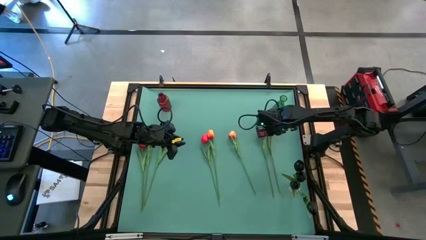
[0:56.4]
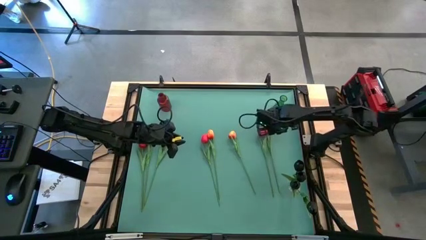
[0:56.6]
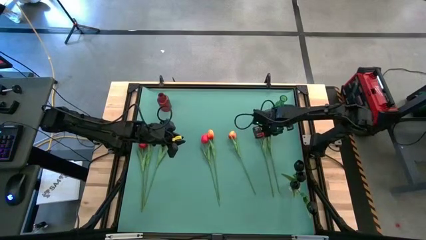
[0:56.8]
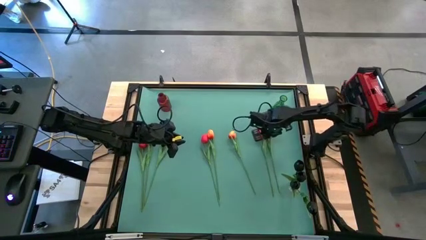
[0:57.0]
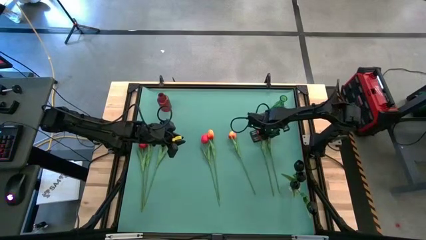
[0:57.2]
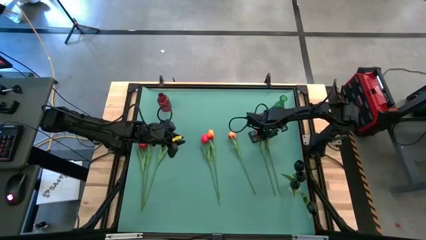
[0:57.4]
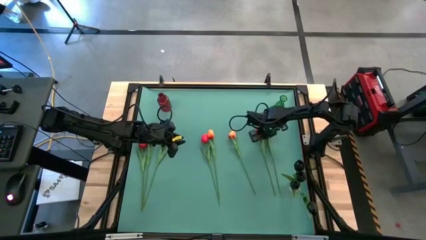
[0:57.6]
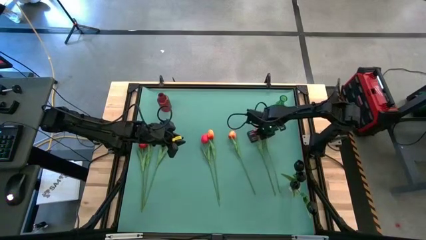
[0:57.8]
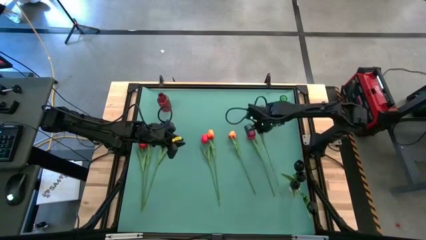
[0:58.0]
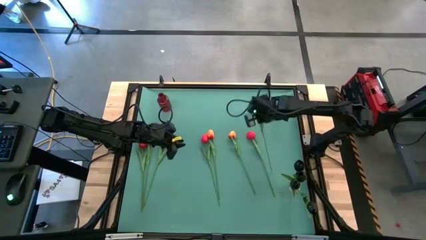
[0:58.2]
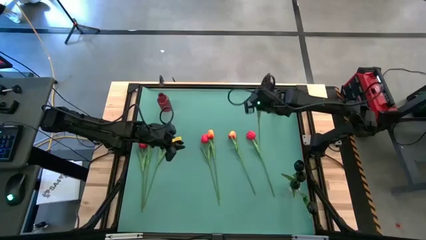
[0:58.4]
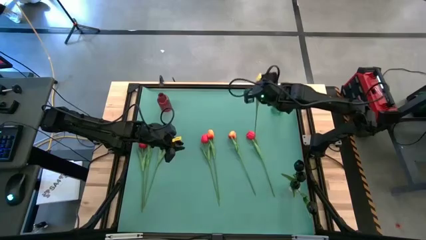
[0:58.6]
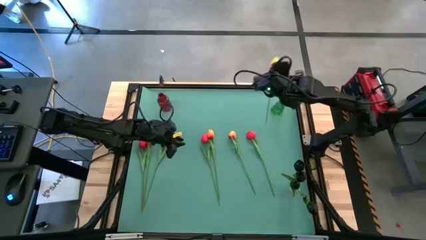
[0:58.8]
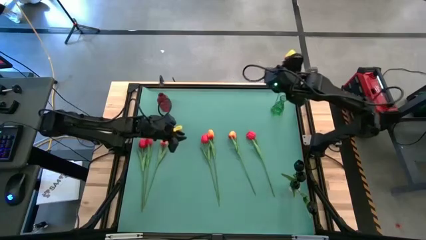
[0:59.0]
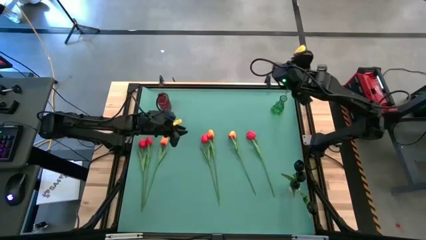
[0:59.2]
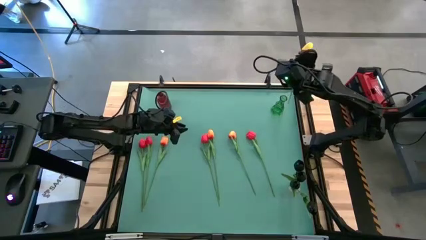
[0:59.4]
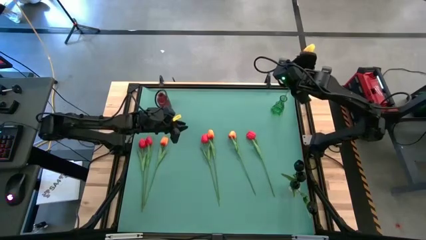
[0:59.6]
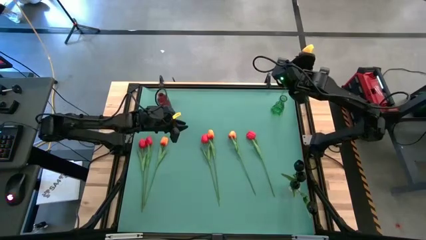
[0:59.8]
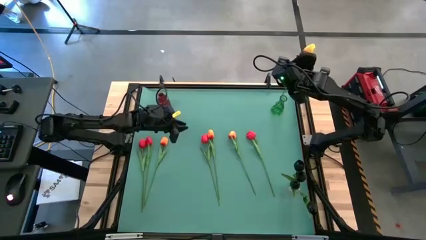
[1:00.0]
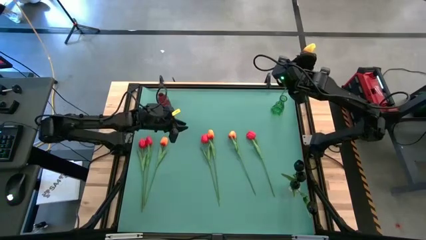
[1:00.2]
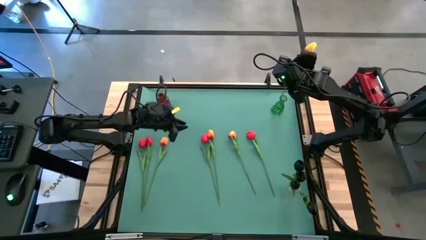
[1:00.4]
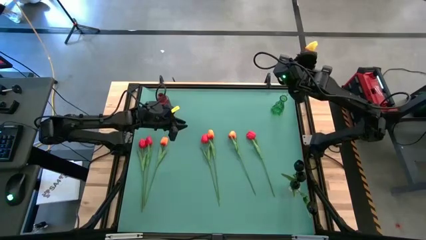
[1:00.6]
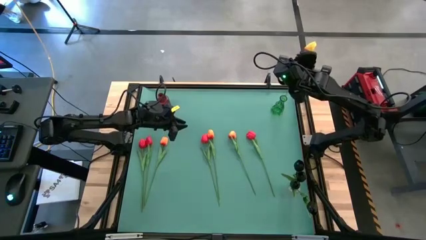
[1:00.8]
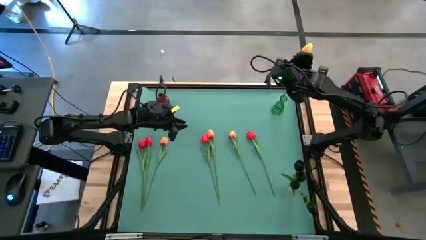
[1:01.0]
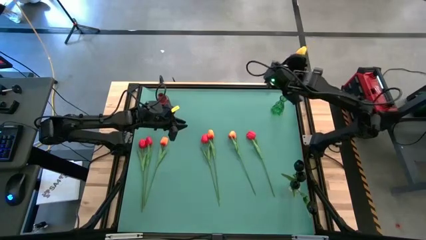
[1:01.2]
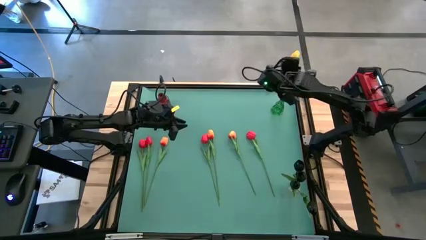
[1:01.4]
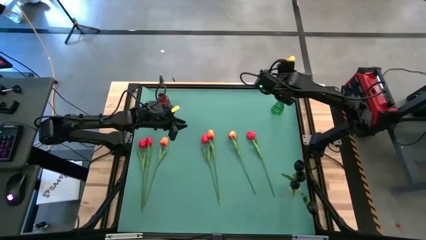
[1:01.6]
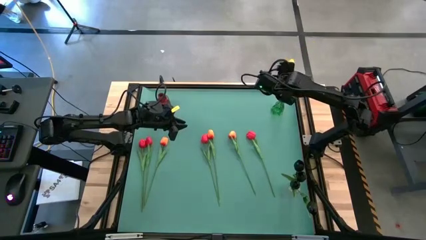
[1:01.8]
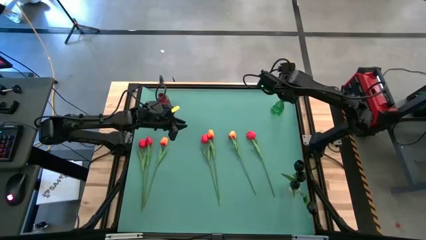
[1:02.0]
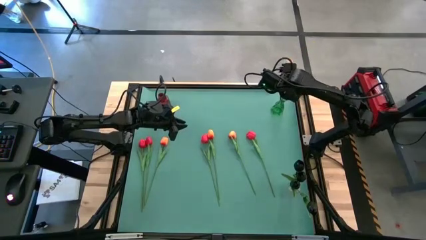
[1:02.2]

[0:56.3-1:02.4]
Task: Sort flowers into vase by color
Put the right orange tulip into the green flower vase

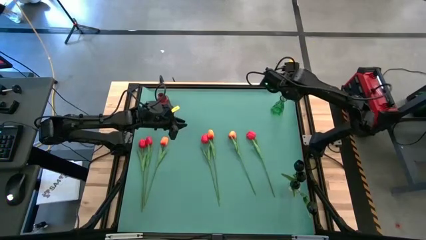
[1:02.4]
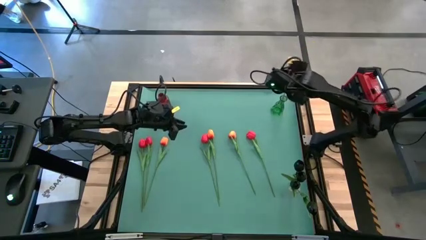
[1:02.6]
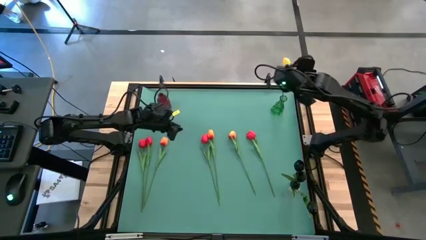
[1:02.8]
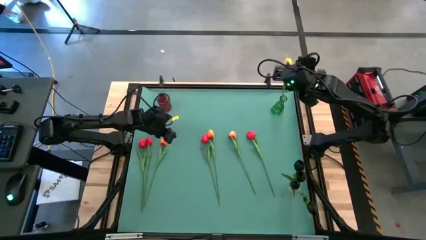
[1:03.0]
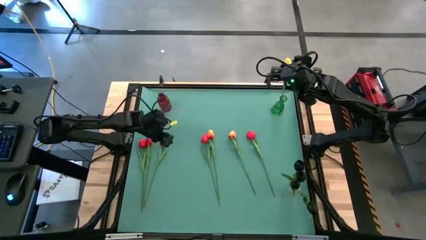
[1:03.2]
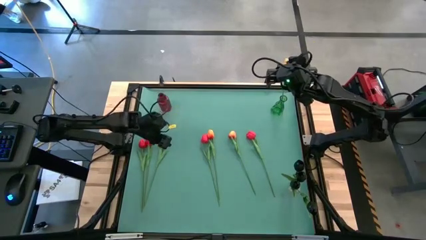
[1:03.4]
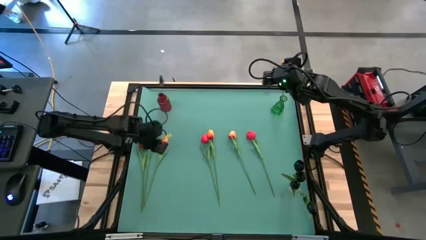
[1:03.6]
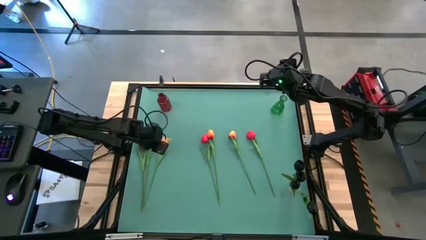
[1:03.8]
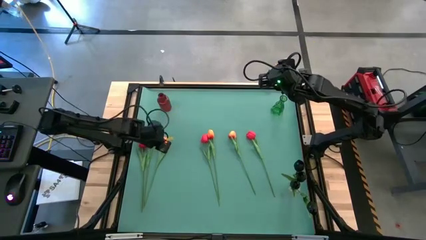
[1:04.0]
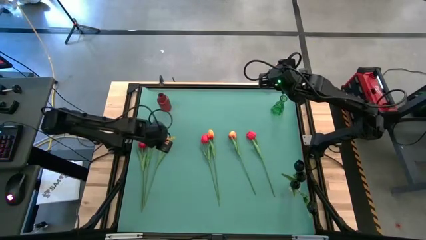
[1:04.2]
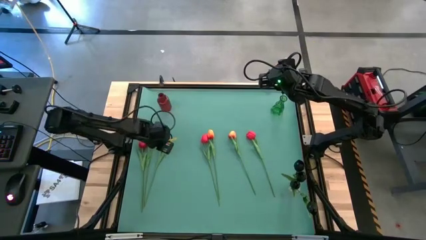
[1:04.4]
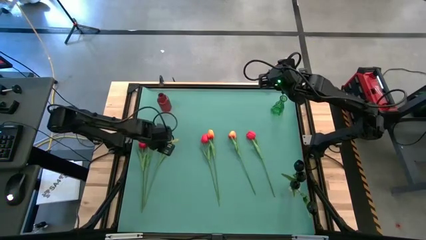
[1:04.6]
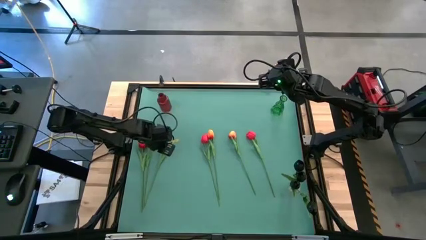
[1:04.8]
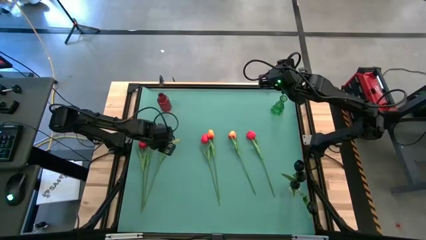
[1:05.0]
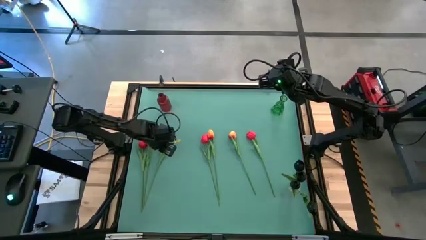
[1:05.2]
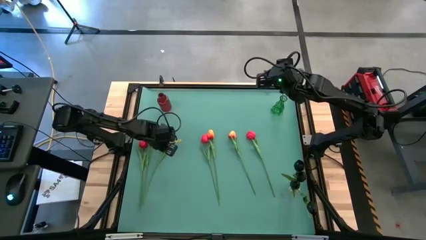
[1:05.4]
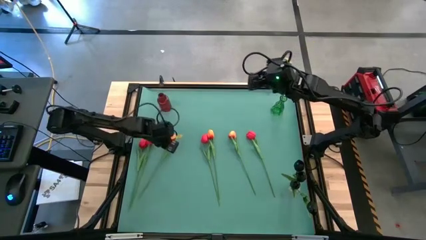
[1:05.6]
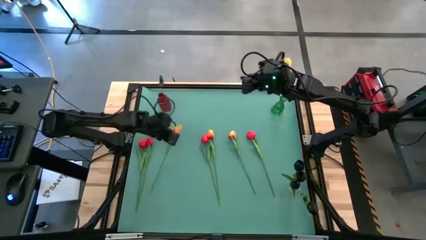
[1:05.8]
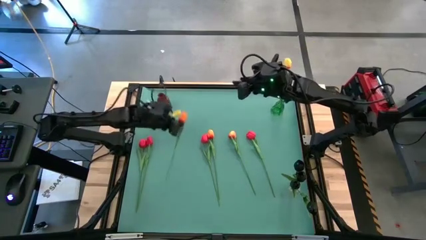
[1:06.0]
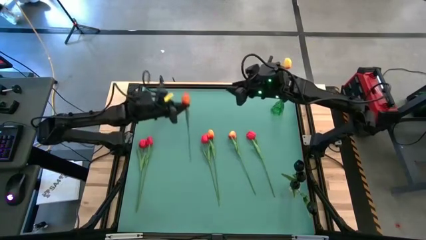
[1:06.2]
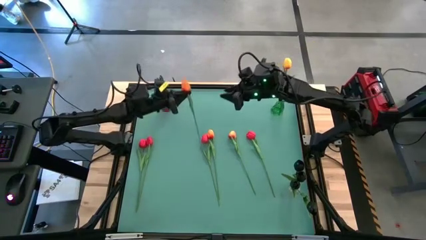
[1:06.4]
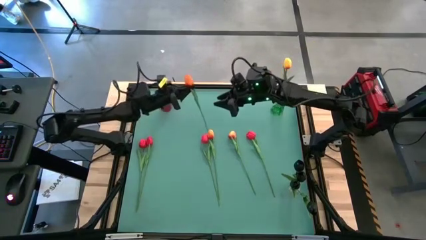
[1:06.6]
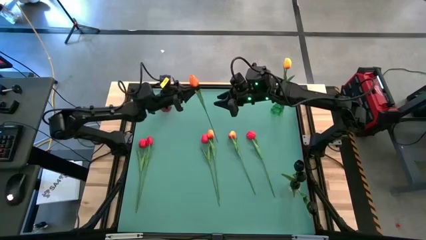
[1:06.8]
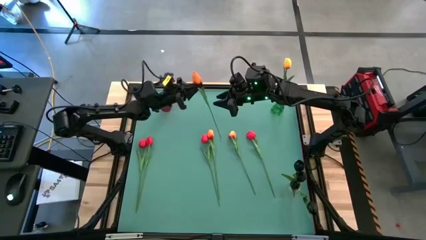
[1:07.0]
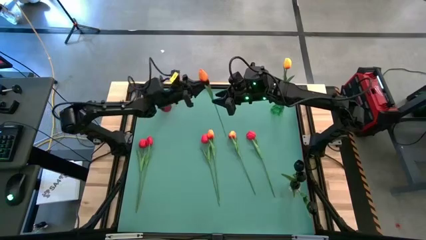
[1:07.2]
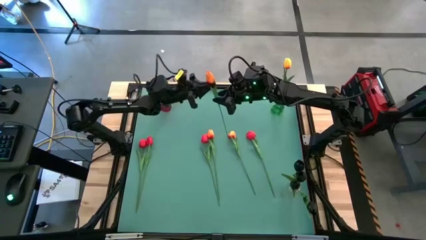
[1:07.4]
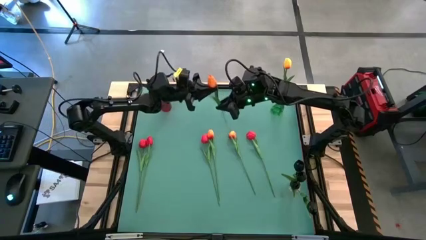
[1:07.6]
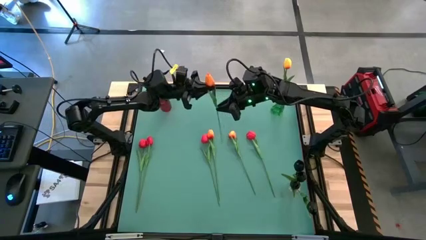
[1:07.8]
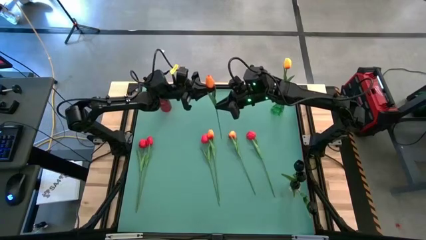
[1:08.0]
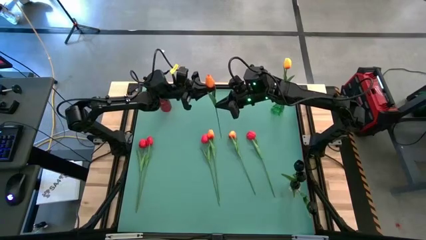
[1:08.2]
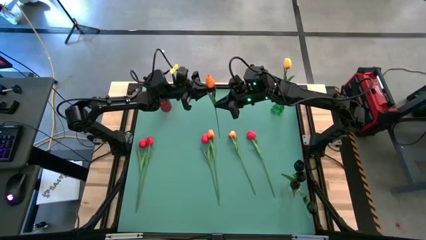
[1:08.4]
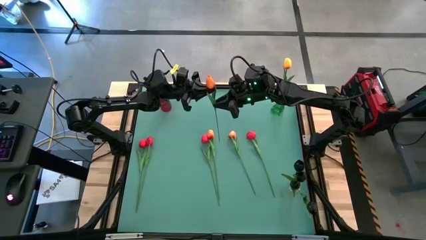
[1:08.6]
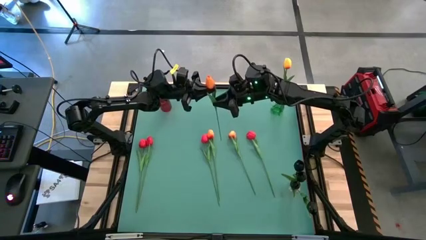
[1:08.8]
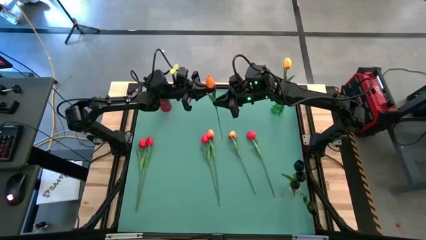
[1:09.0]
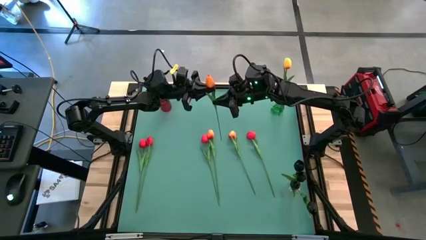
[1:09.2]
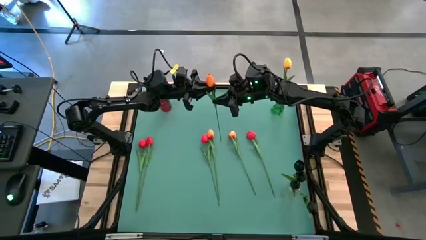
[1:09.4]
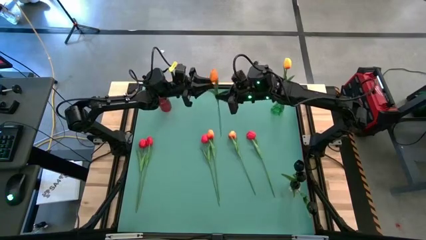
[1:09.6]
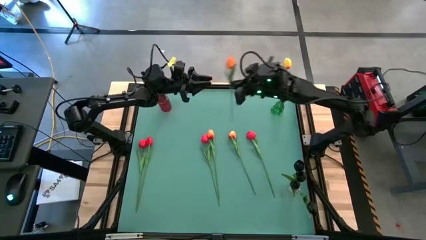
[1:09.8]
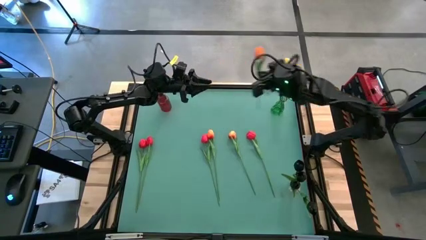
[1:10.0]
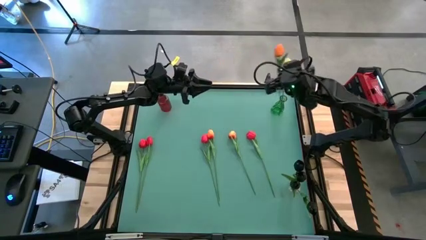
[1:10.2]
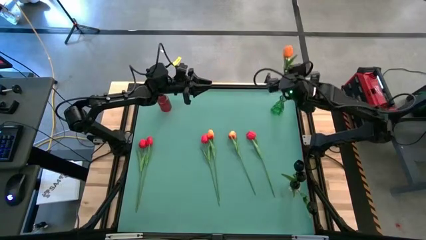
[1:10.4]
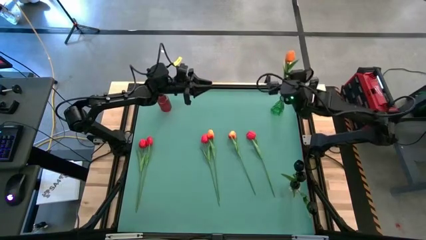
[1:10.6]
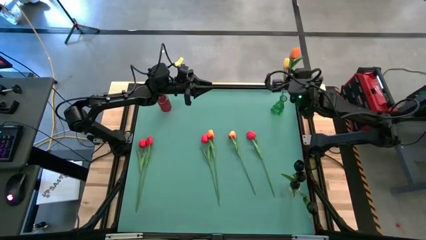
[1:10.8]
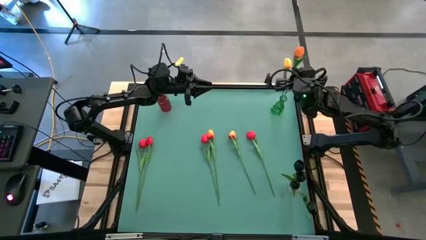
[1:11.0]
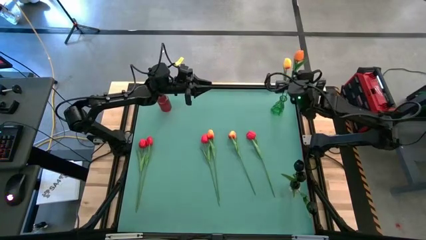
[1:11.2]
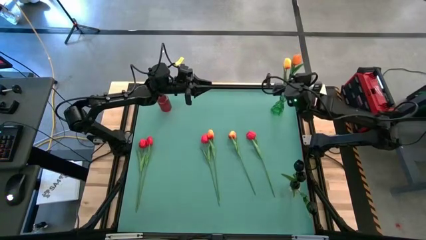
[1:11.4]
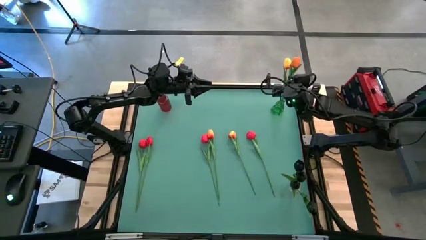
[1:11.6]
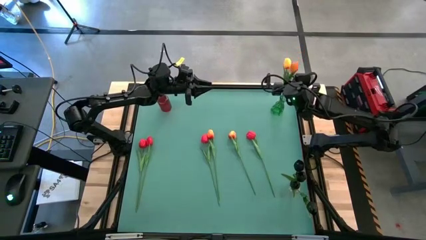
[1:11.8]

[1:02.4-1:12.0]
Put the left orange tulip into the green flower vase
